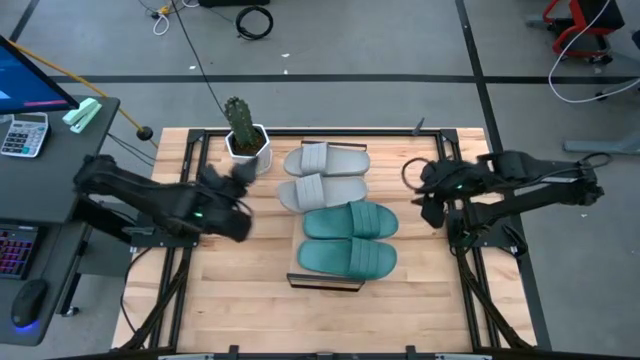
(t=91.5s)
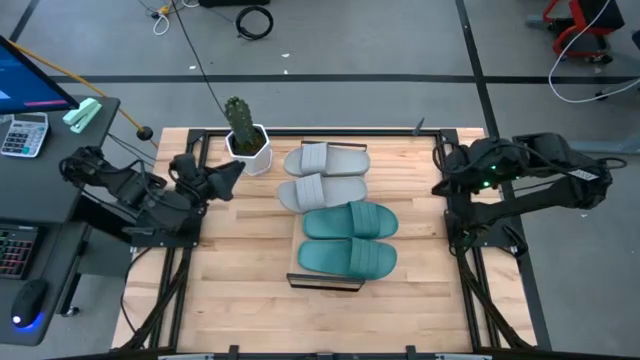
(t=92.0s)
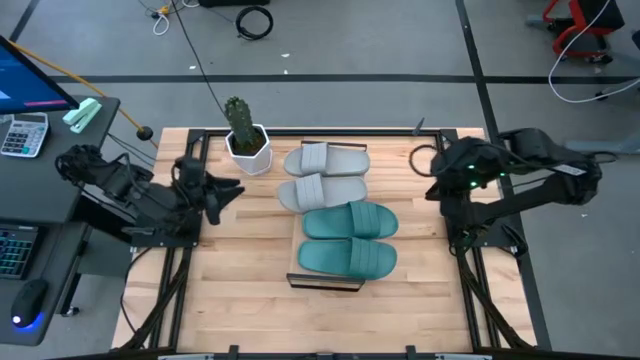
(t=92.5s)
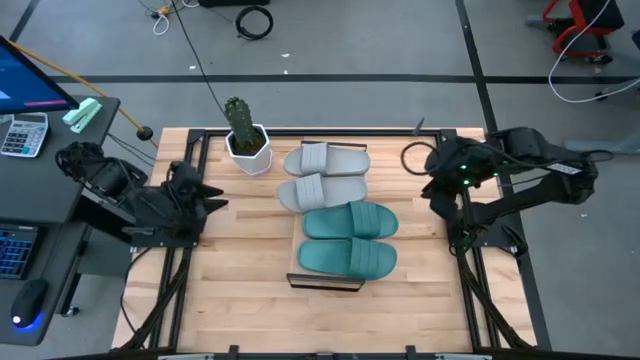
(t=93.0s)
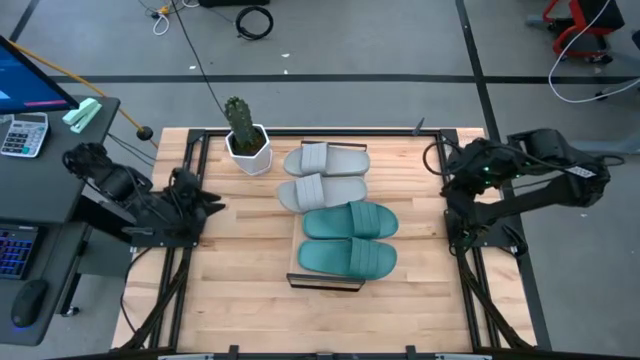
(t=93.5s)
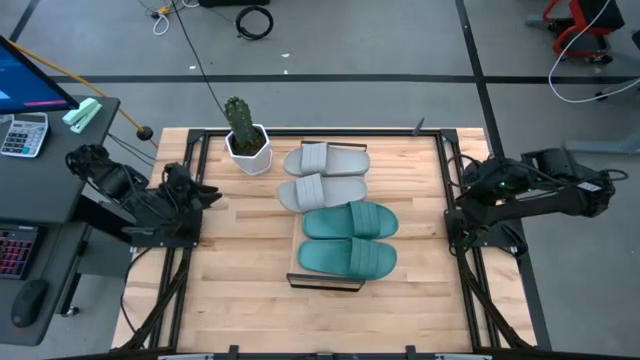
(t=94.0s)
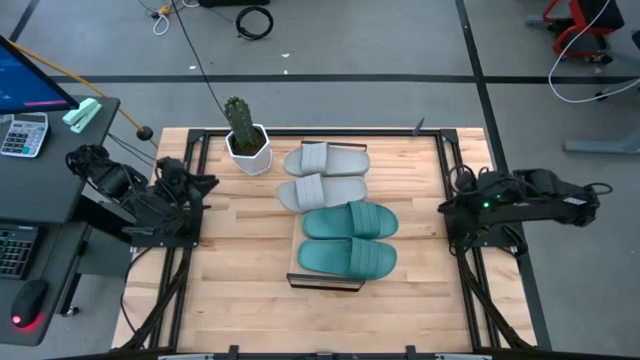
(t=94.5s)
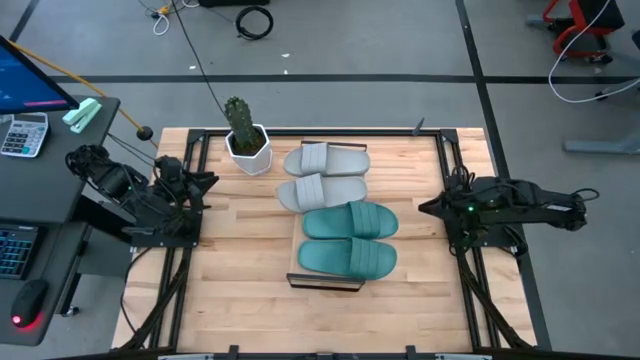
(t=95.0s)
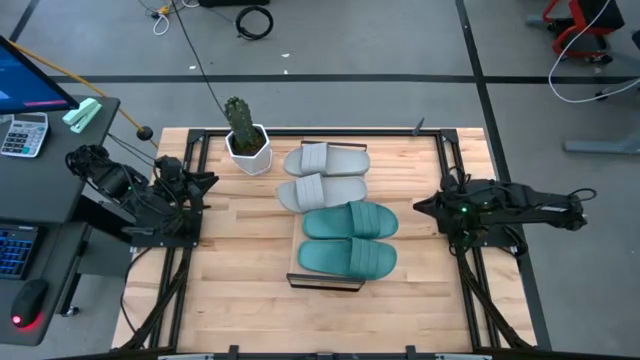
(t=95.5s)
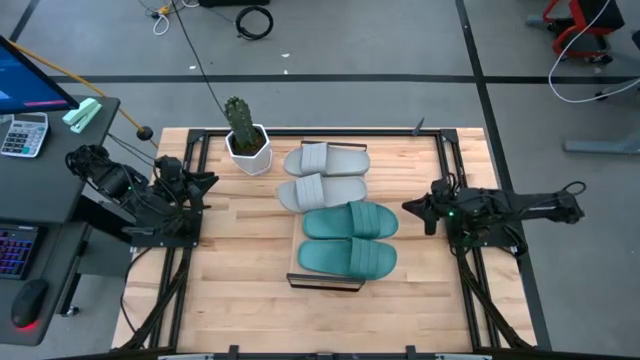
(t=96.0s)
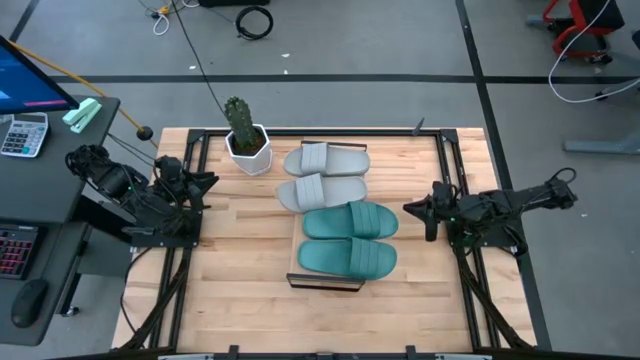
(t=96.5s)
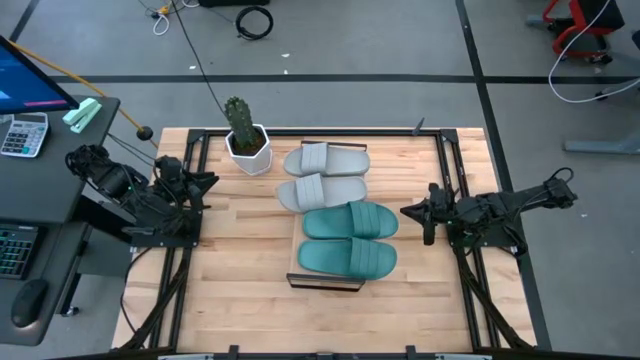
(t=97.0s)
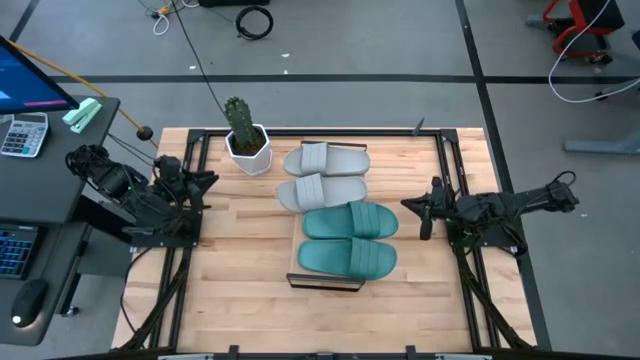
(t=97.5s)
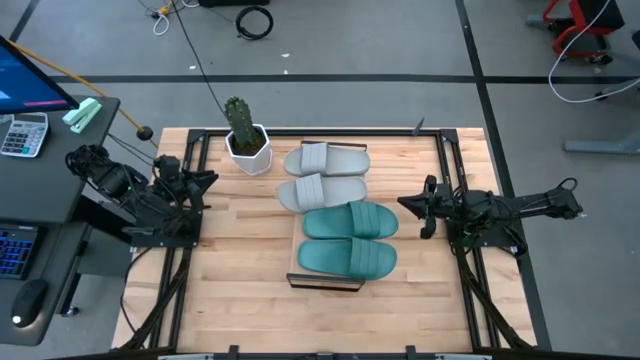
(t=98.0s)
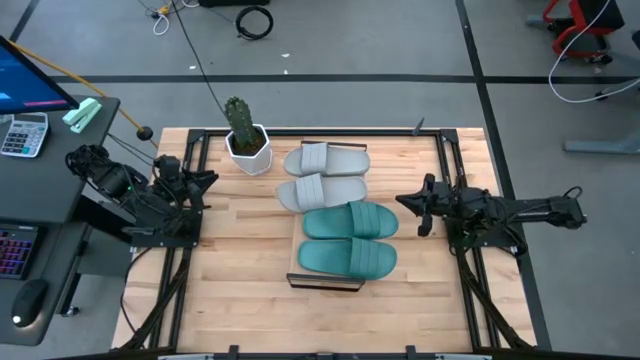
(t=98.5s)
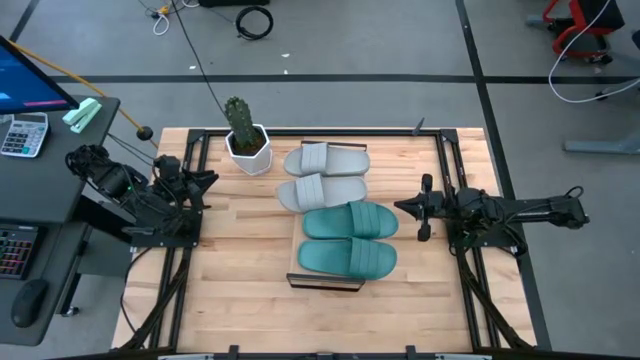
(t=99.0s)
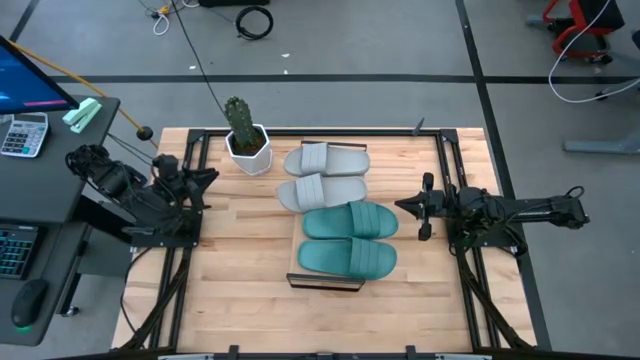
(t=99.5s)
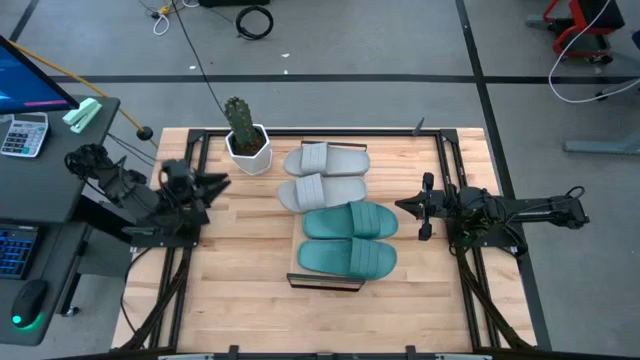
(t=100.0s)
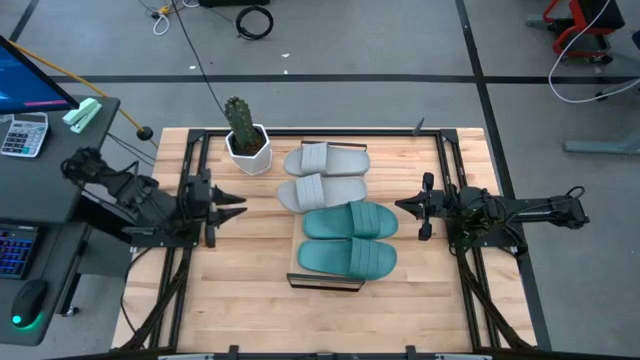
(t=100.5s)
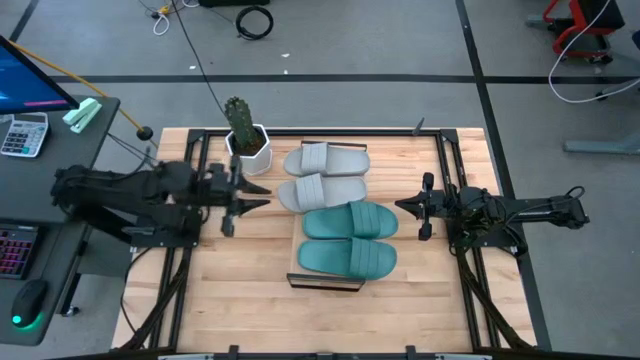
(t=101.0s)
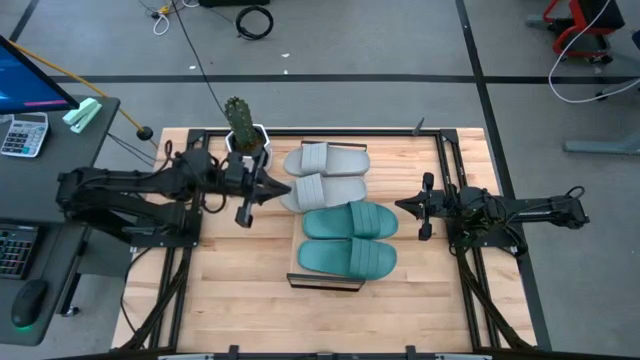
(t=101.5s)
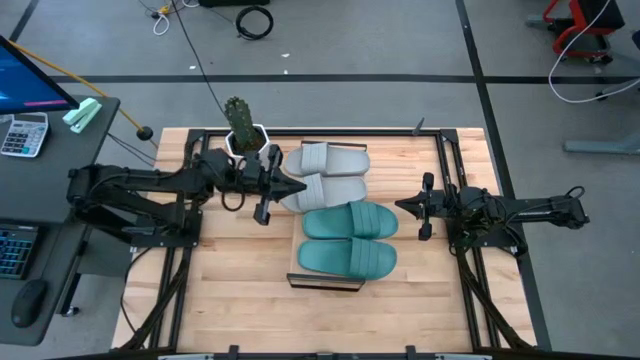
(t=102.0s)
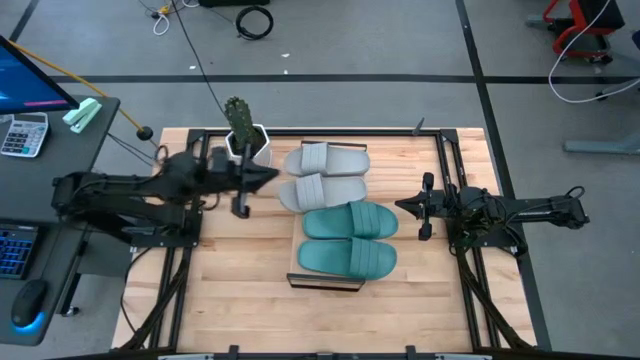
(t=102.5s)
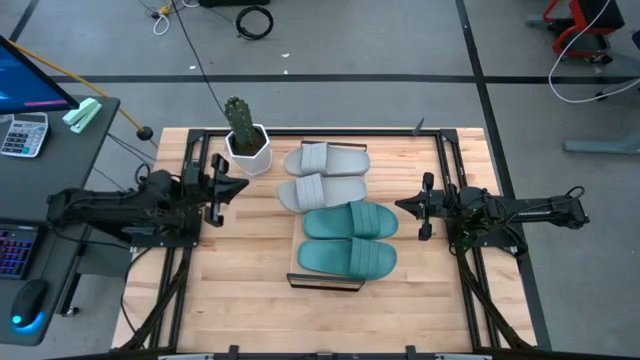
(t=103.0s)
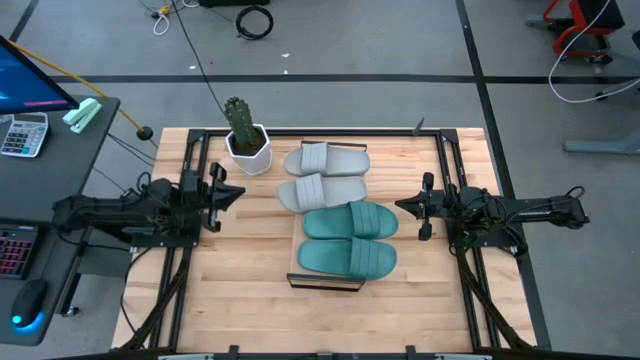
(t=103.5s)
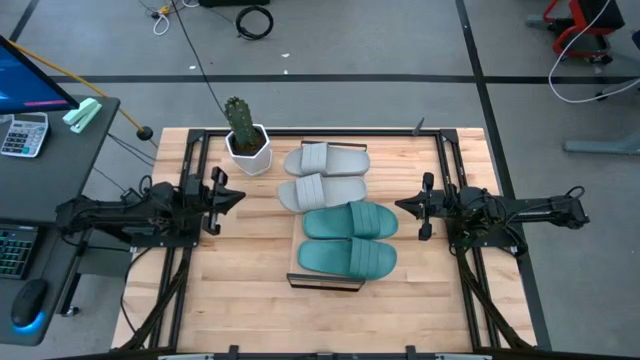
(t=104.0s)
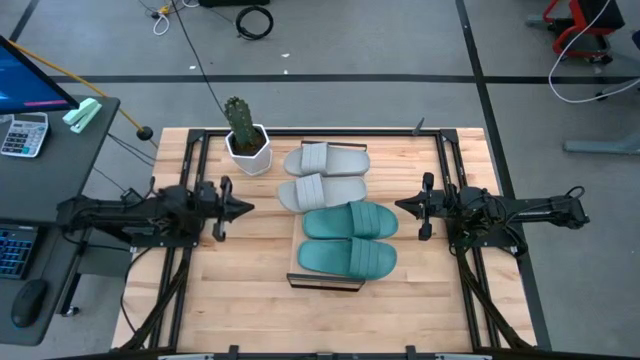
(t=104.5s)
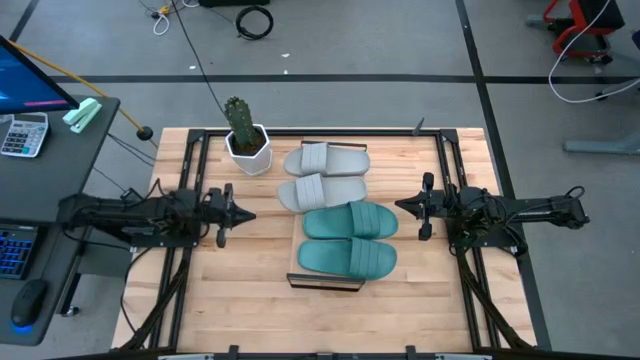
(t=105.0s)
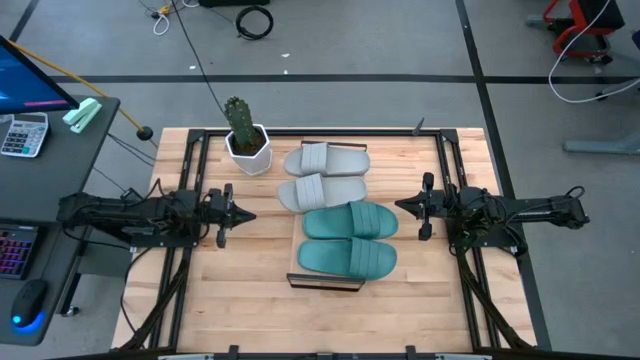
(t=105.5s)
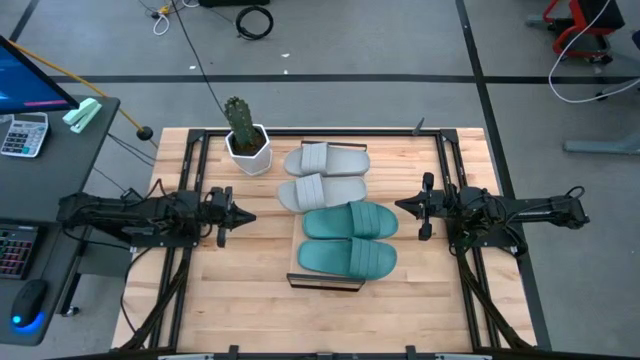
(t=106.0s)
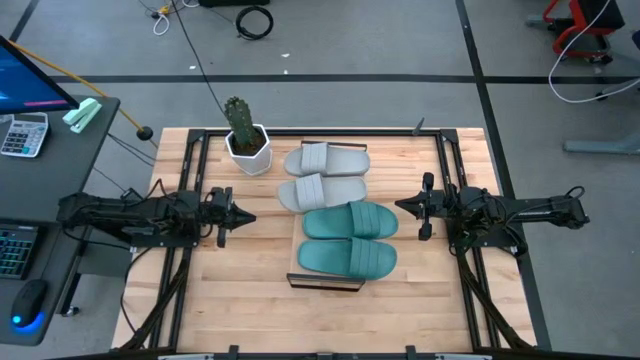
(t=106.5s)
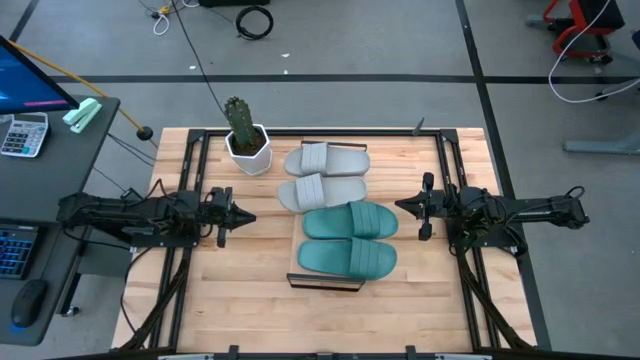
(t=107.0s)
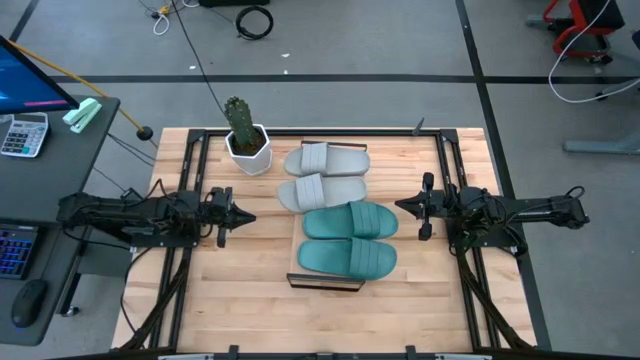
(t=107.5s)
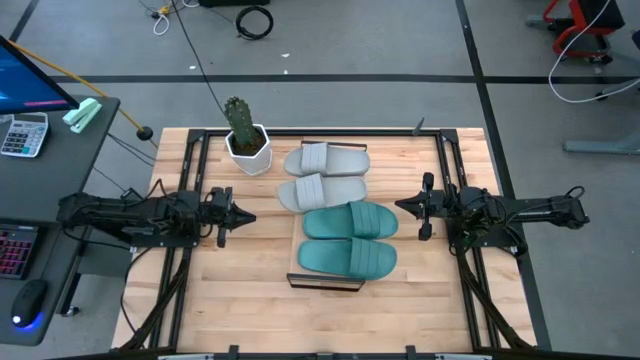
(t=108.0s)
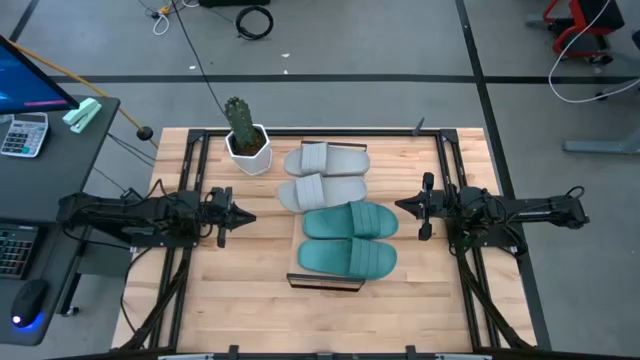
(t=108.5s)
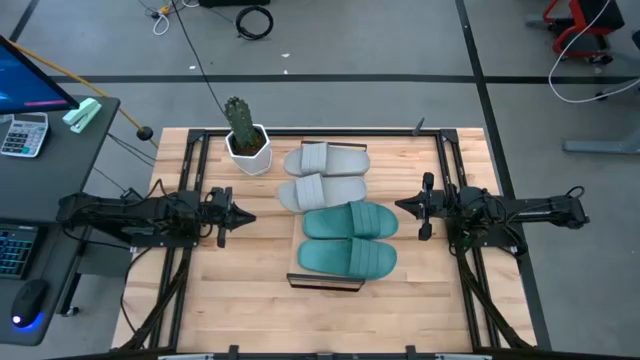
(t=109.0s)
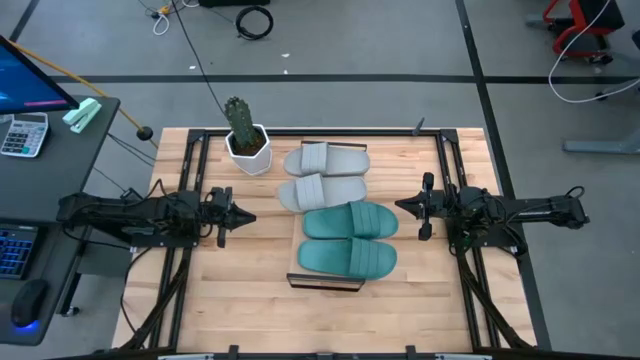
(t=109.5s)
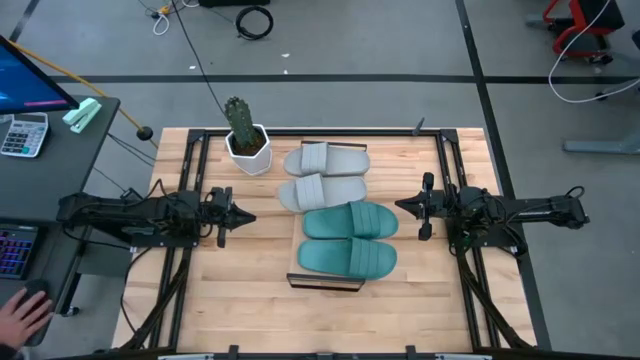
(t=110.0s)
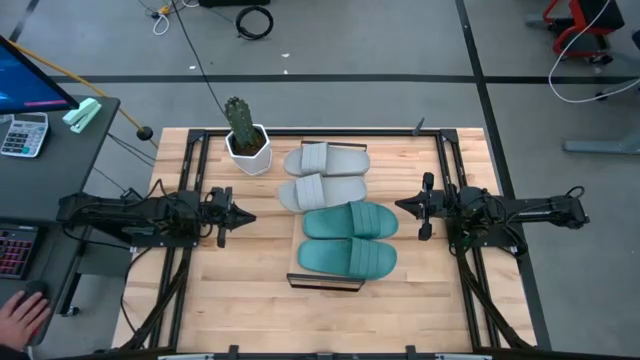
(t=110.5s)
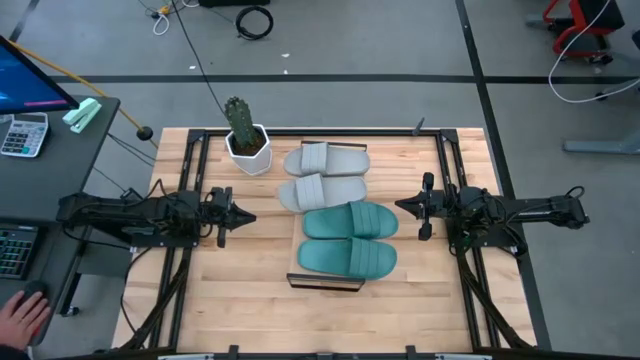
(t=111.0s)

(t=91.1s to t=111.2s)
Task: Pick and place slides into the shelf
Return to Home Position

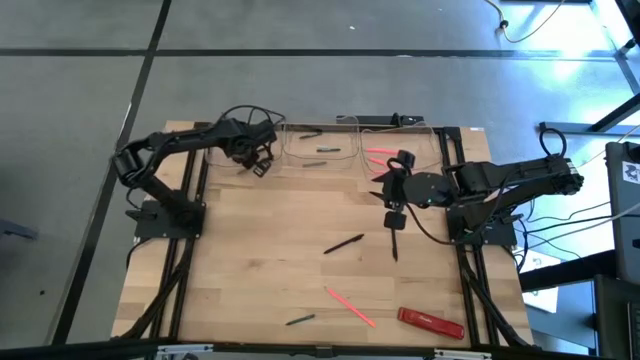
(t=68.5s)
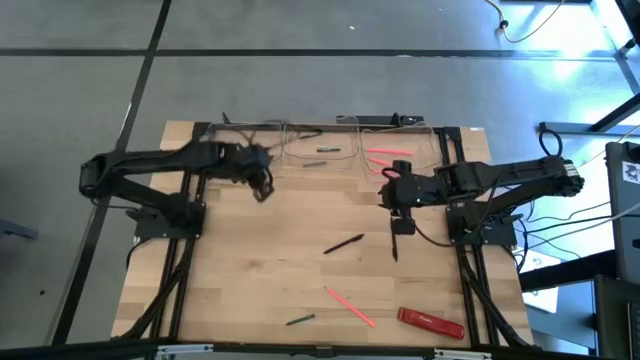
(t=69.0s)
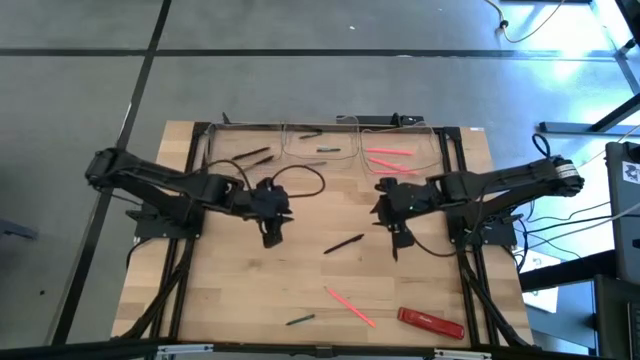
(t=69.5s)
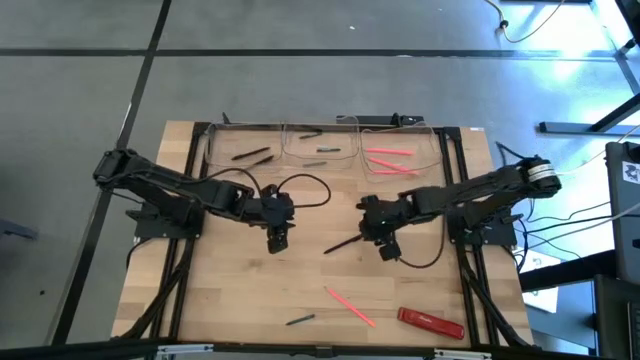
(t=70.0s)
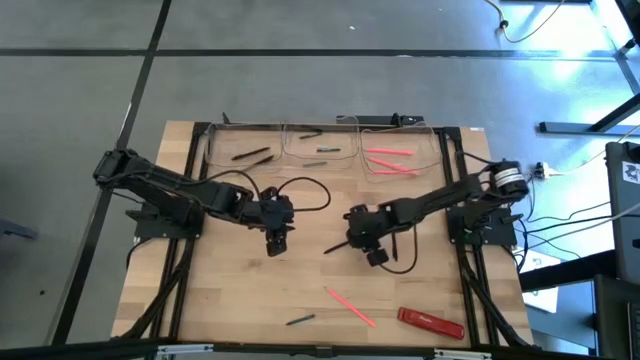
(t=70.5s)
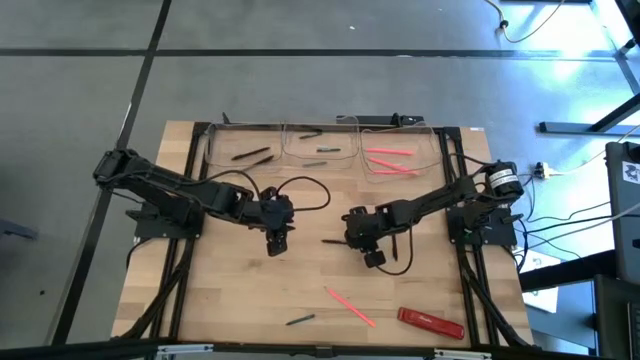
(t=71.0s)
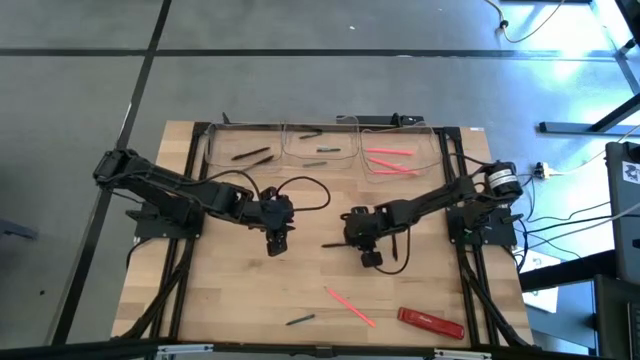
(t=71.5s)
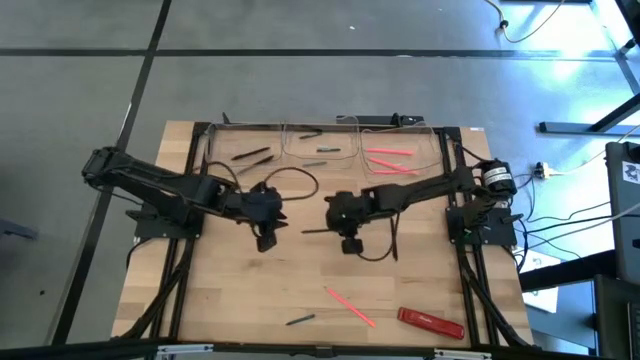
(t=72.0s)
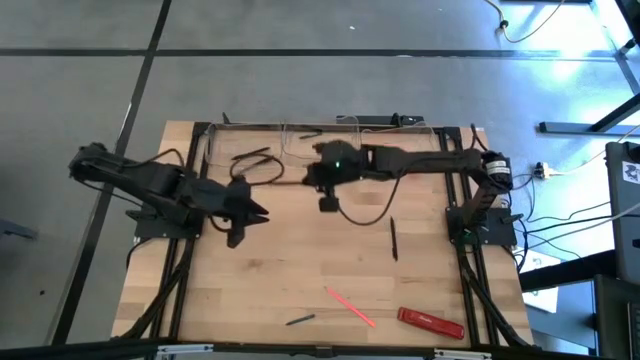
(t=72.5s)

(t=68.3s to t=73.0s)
Task: Sort crayons/erasers/pens/pencils in bins
Put the black pen into the left transparent bin
